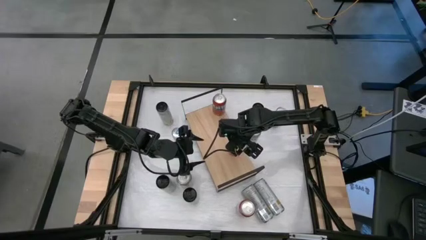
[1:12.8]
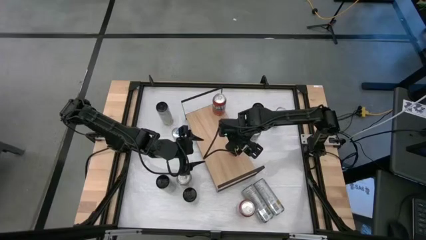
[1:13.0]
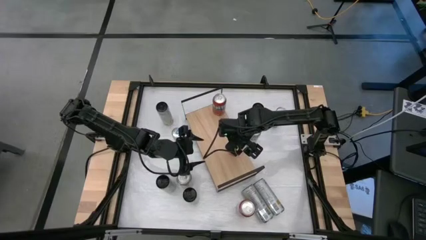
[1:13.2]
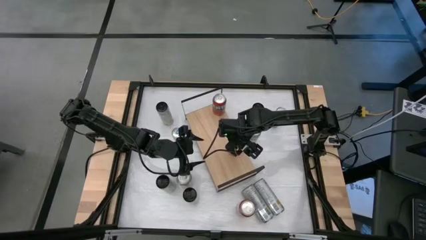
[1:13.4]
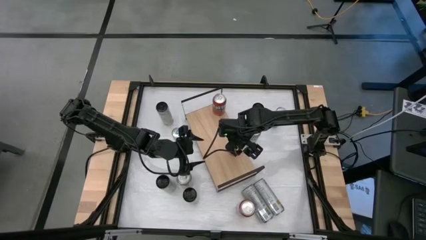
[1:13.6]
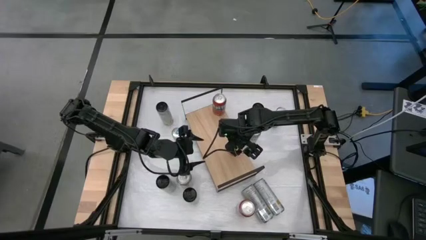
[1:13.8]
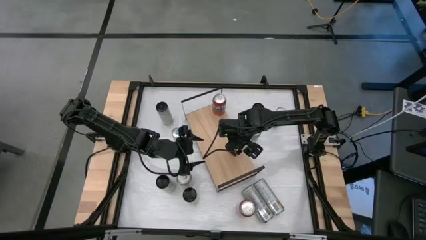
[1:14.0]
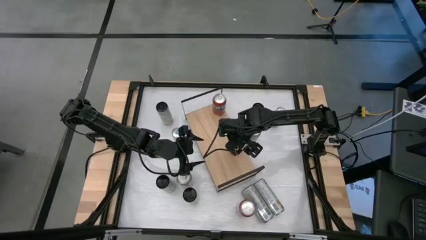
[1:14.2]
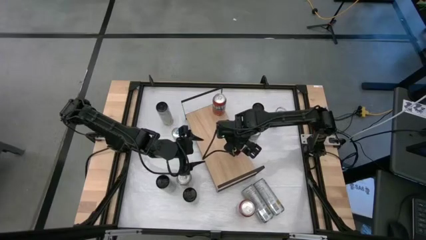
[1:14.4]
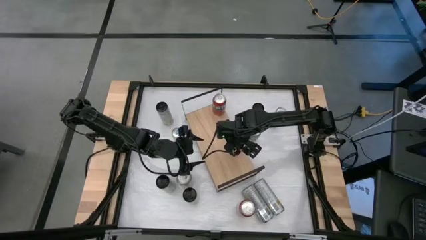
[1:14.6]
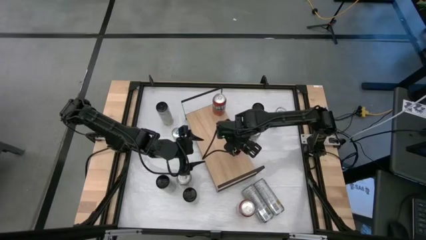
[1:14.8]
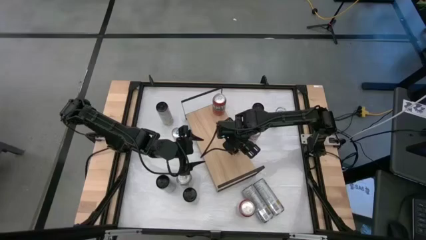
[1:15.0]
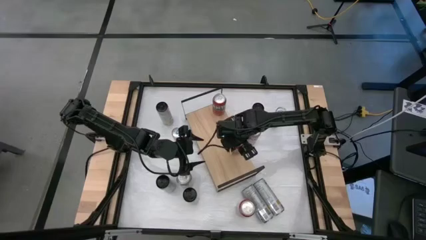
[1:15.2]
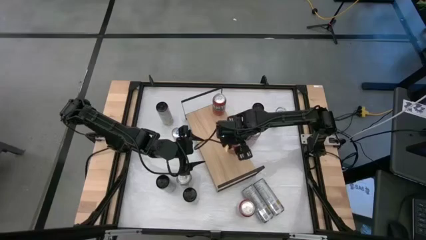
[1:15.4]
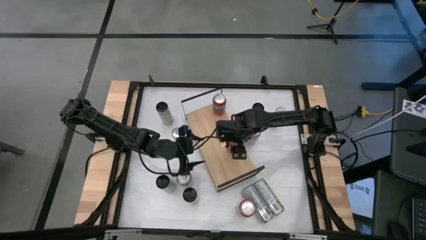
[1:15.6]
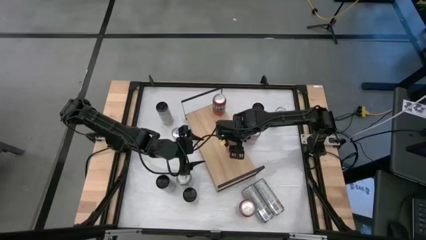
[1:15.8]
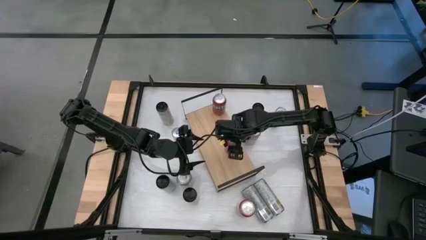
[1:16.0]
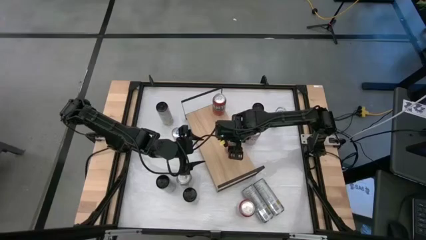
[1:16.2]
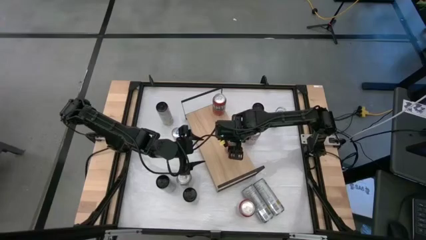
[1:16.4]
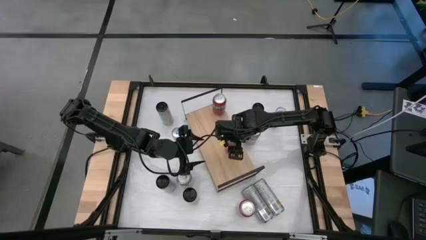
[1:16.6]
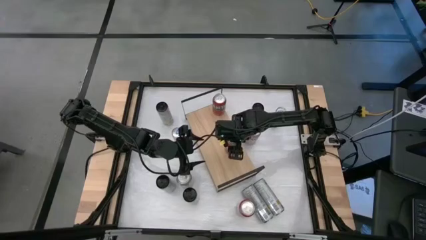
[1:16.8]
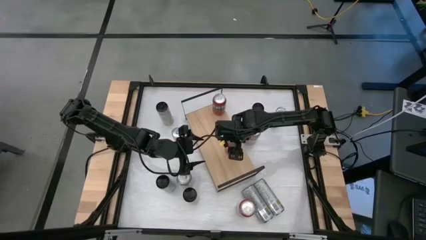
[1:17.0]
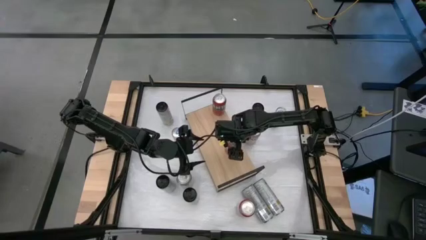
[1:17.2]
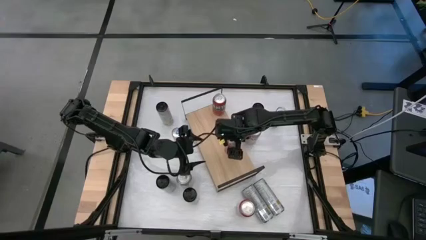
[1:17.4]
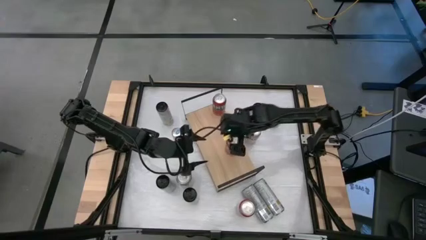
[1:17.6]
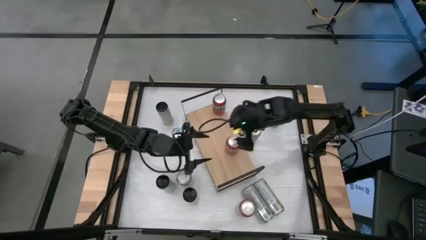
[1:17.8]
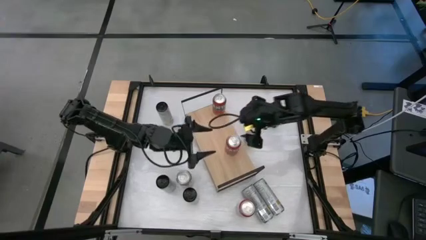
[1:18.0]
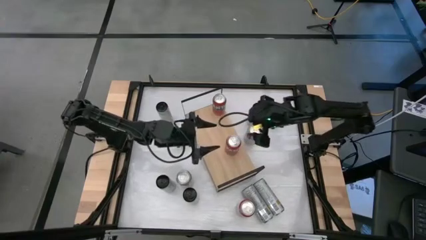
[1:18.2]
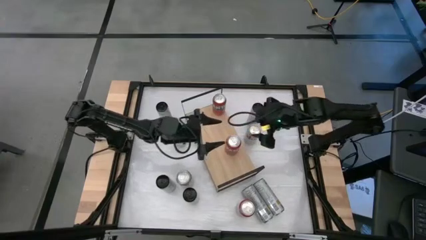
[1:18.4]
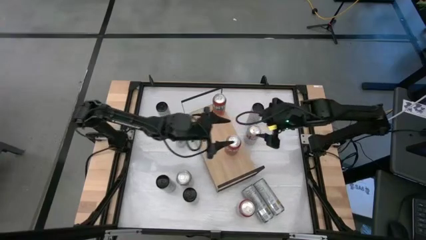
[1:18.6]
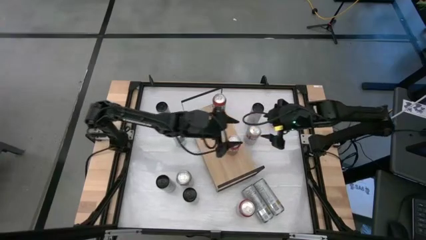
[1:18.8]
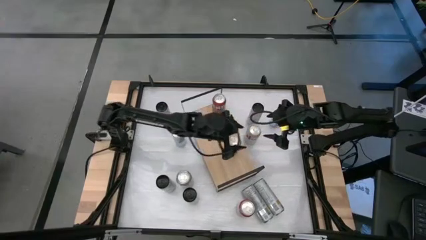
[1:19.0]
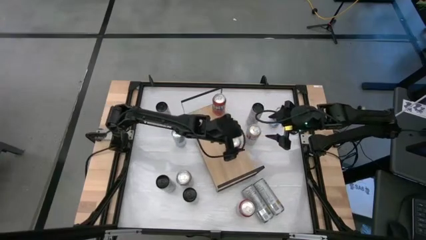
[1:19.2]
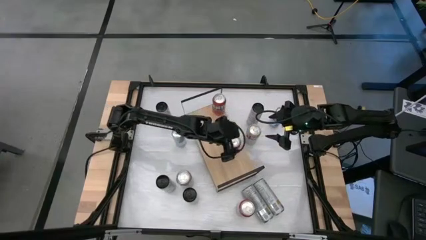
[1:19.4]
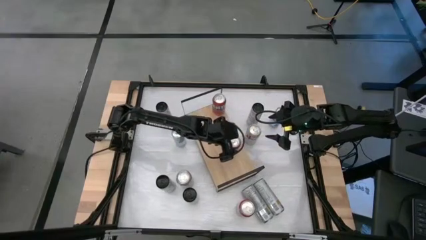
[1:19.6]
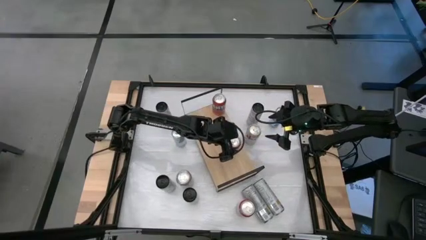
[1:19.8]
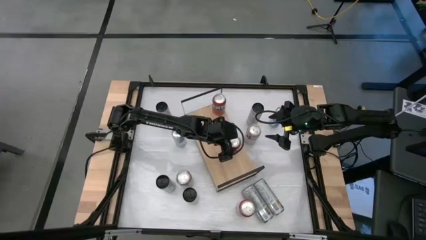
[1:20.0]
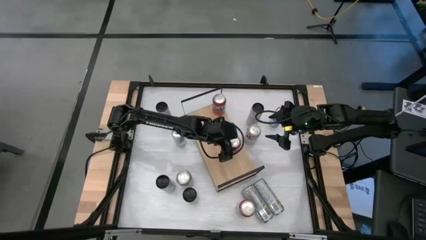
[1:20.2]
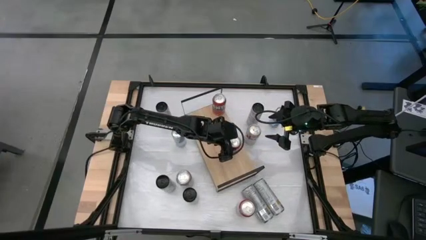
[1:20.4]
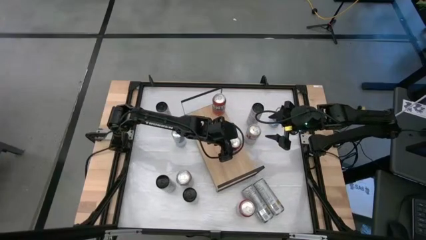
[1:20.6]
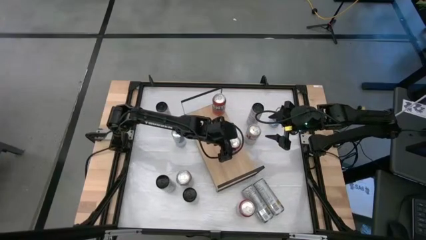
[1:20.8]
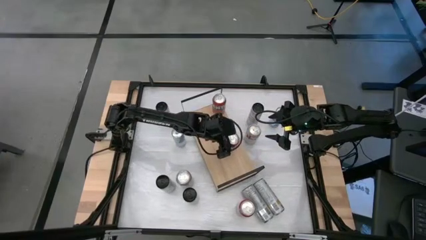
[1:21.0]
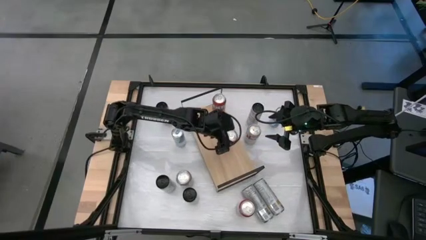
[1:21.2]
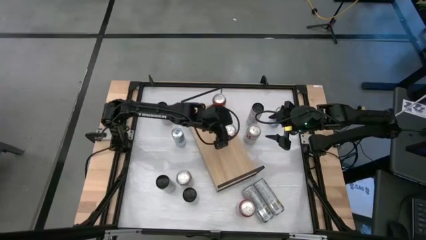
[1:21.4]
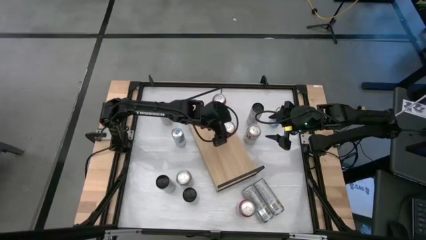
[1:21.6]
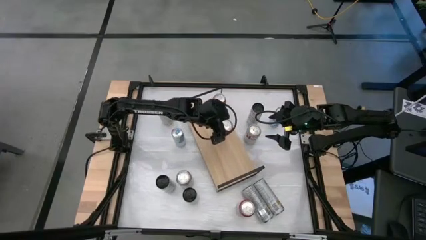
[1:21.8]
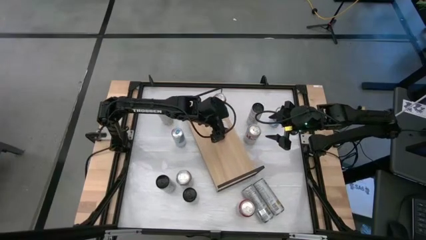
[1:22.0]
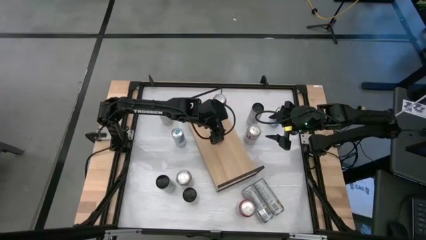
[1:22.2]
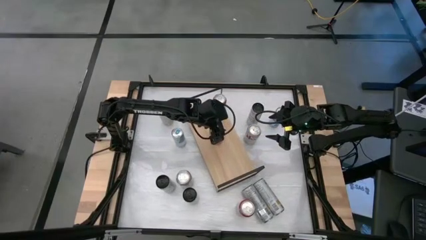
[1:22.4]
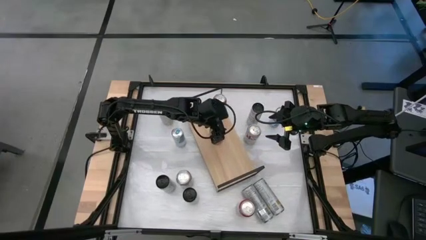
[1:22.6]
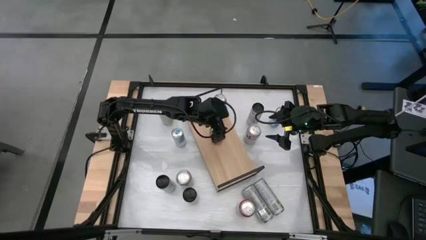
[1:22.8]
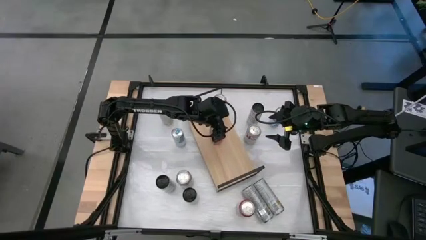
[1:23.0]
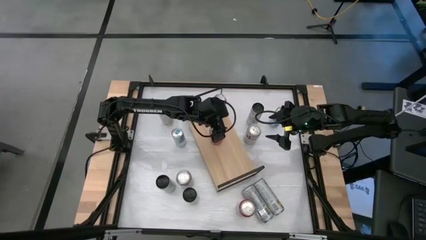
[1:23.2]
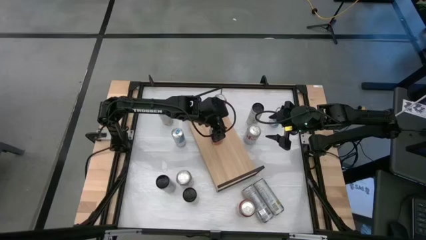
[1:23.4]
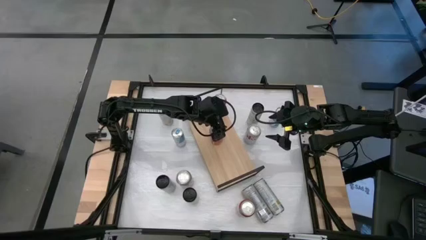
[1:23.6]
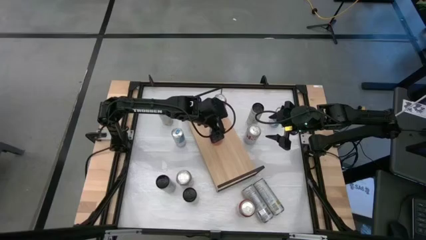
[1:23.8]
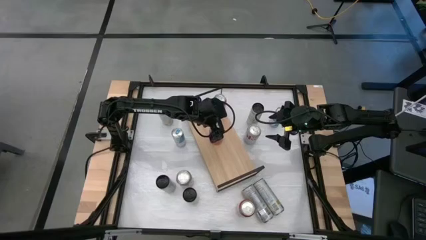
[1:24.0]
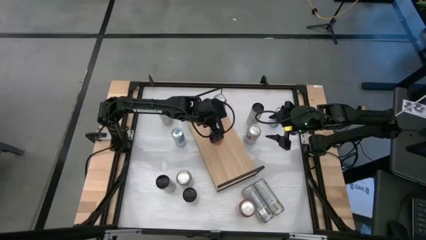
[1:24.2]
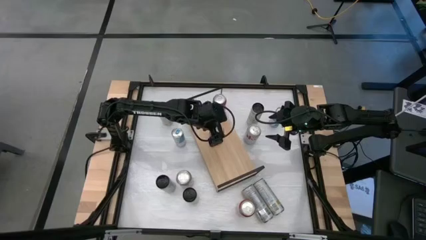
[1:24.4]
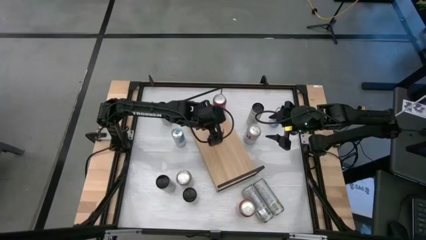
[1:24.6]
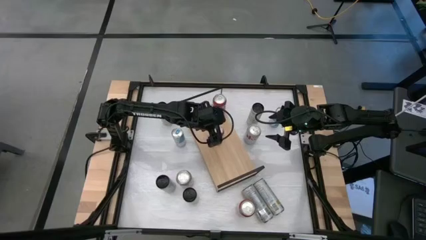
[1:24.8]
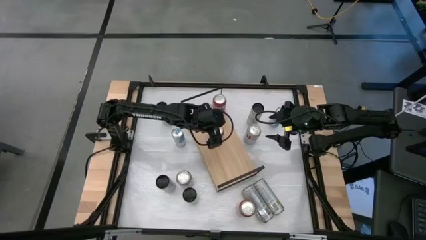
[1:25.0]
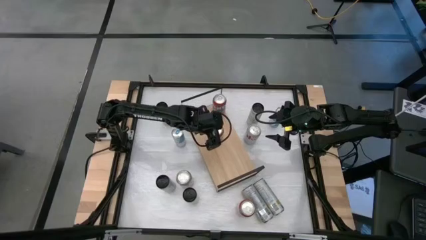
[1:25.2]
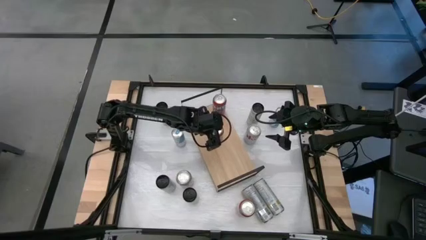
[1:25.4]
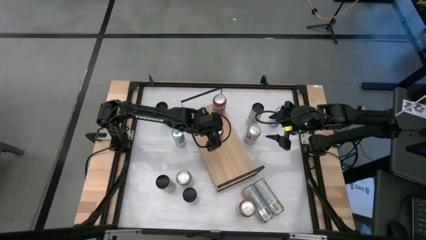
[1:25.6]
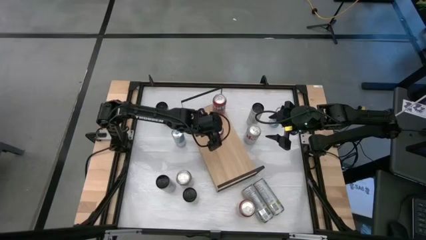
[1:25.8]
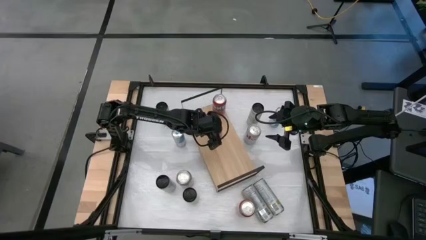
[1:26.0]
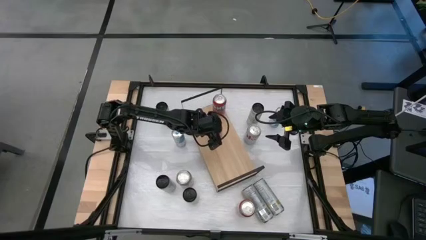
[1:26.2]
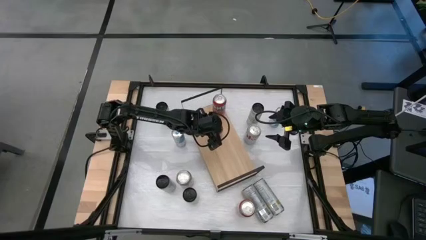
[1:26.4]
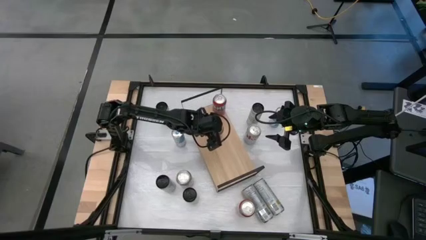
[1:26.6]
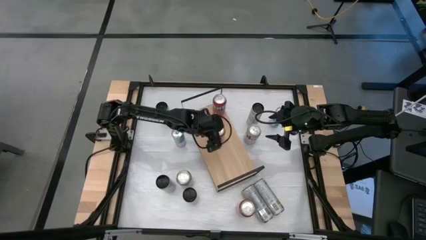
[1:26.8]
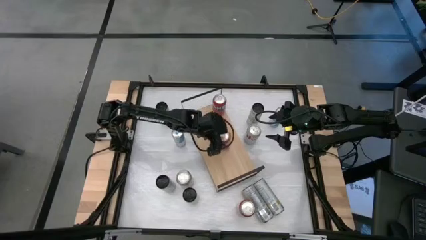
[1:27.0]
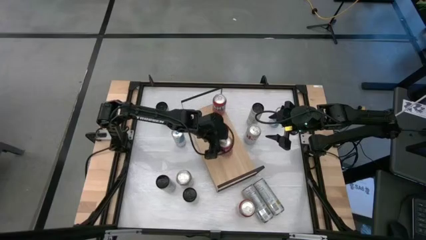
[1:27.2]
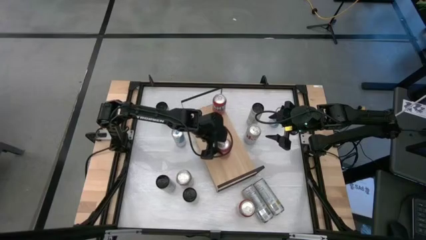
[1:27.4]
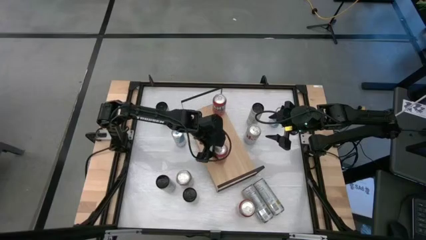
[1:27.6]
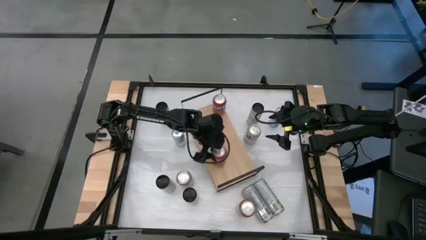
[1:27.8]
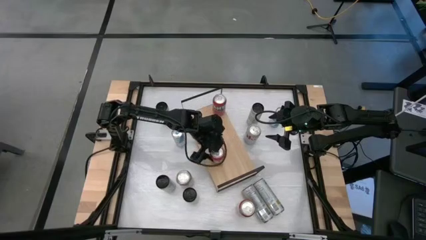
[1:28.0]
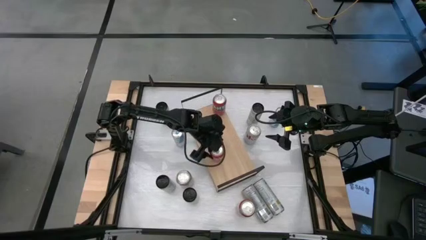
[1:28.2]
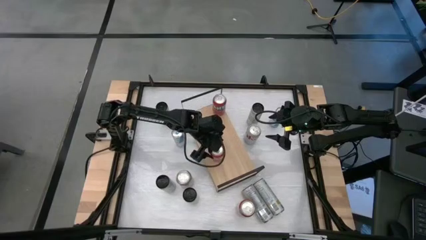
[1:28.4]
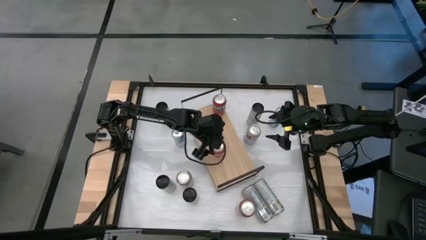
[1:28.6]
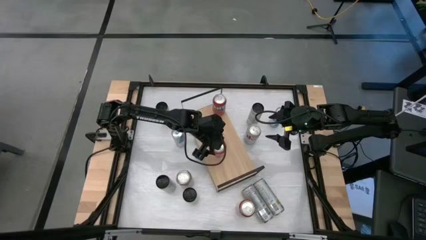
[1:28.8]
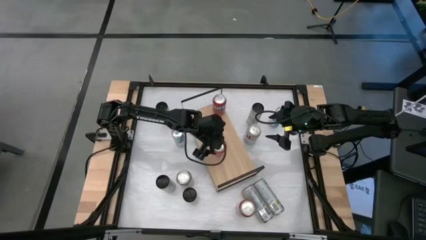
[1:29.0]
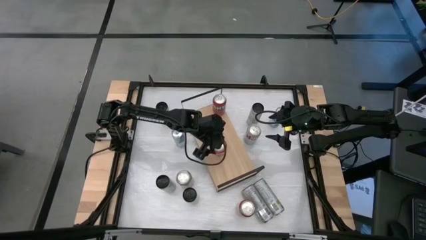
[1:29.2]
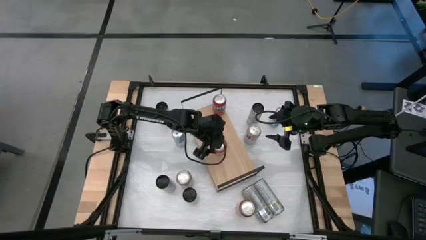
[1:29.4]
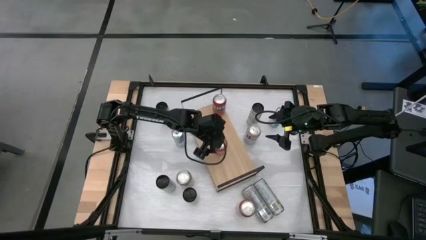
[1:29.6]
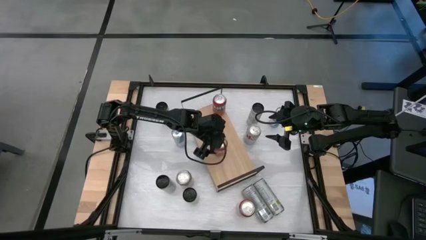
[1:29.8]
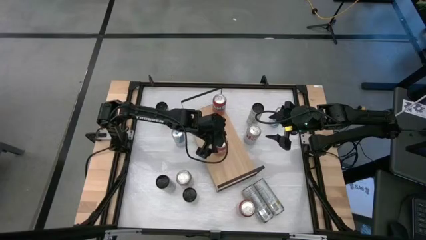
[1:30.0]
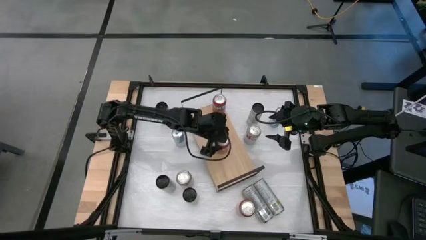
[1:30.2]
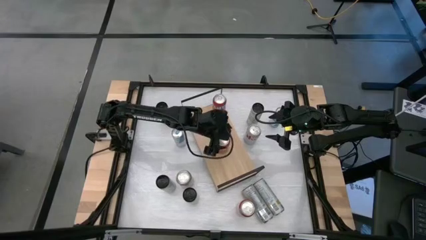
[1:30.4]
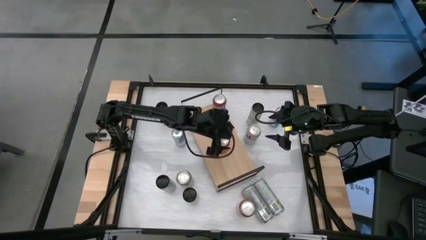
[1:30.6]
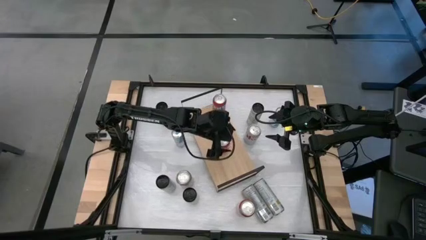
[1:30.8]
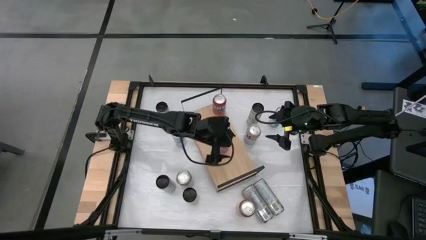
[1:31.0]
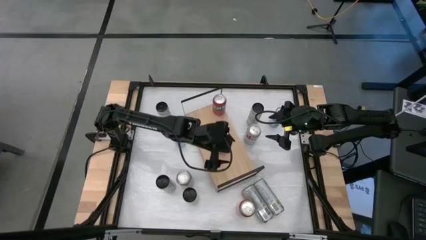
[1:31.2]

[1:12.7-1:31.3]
Task: Place canned beverage on shelf
Align the left orange soda can with the other orange soda can
